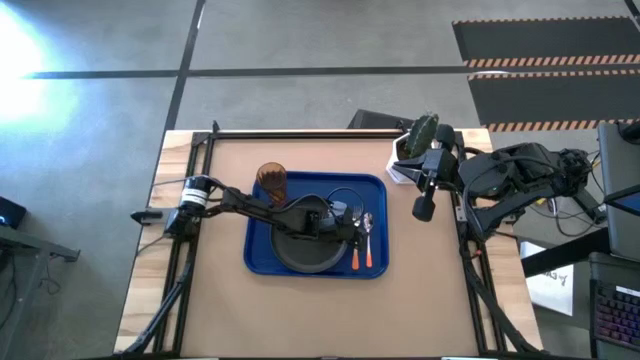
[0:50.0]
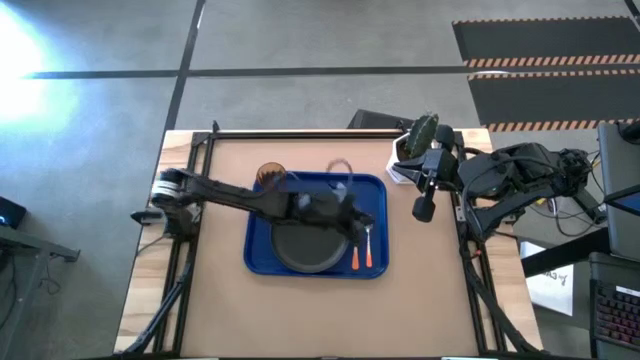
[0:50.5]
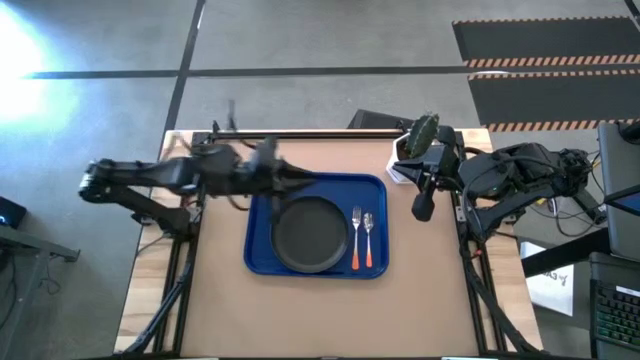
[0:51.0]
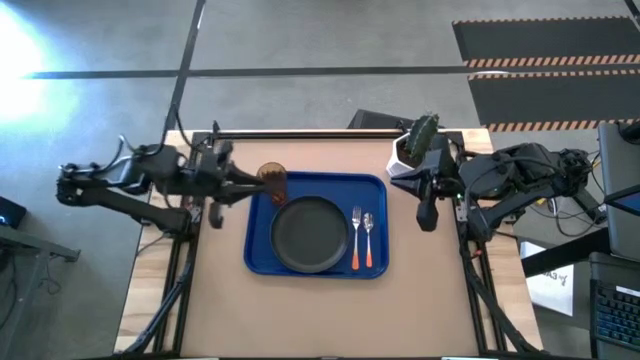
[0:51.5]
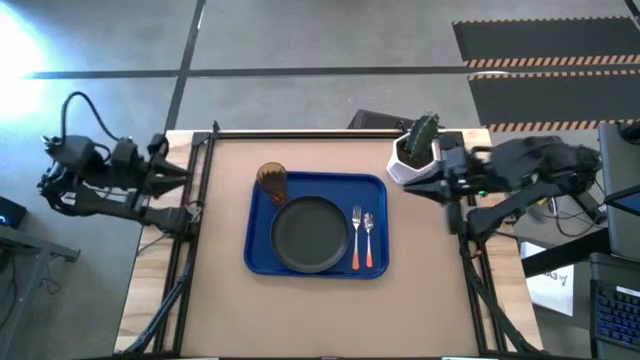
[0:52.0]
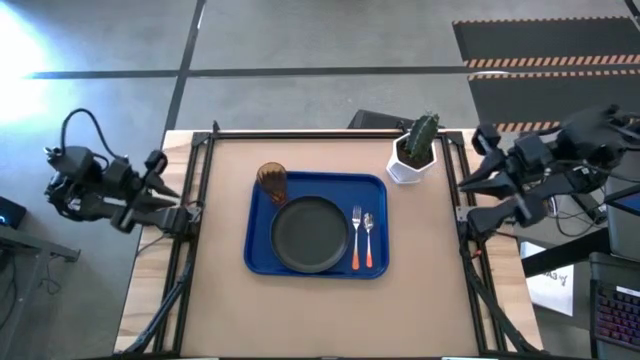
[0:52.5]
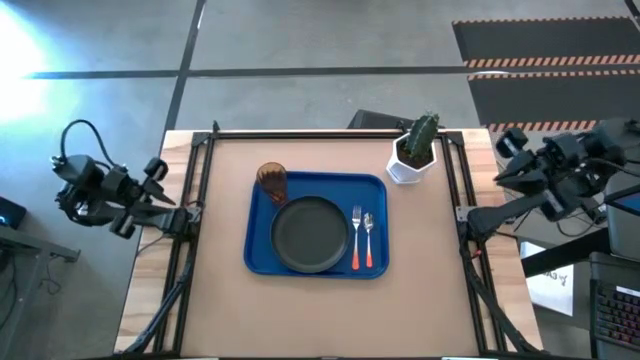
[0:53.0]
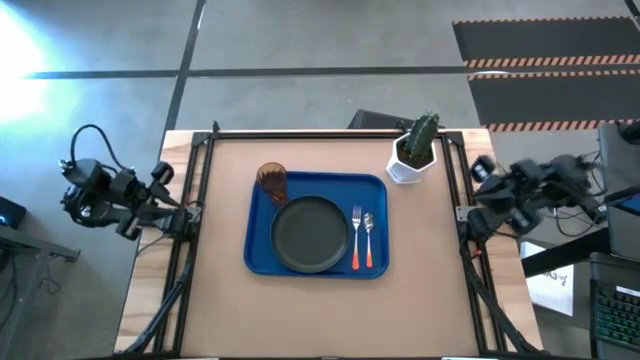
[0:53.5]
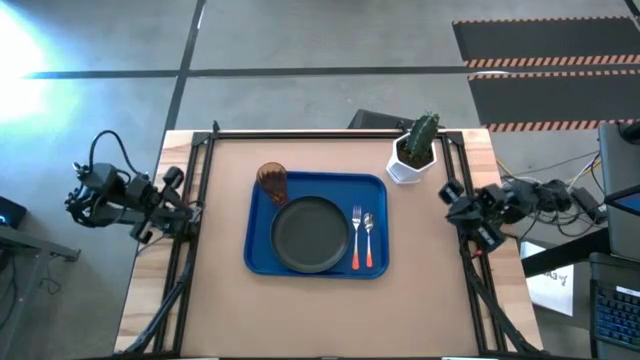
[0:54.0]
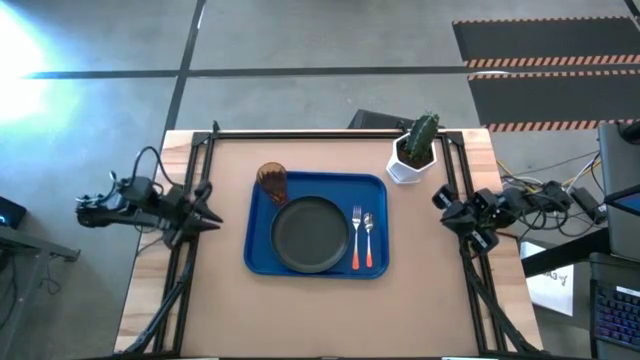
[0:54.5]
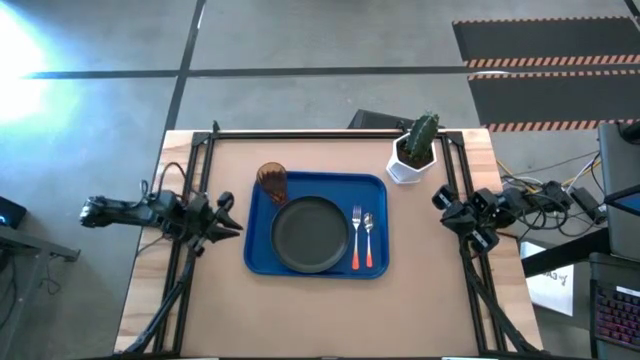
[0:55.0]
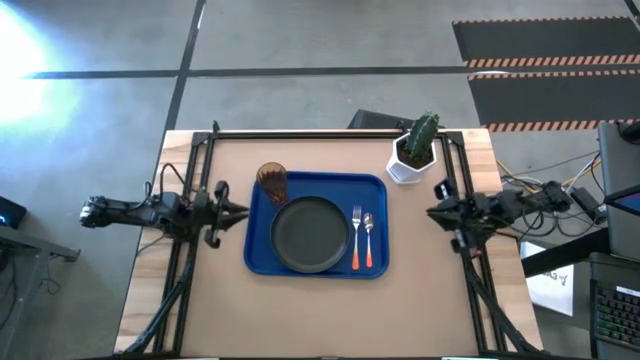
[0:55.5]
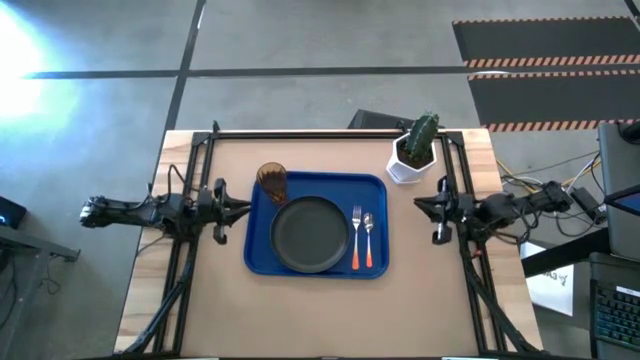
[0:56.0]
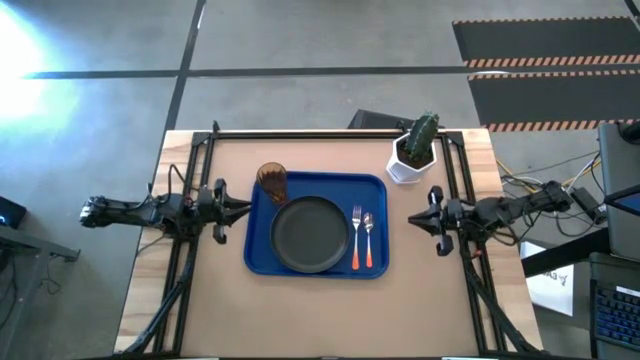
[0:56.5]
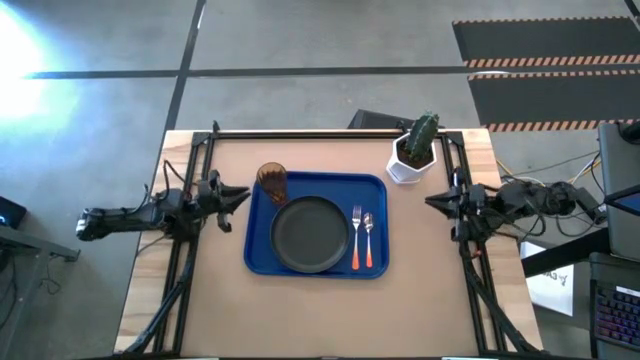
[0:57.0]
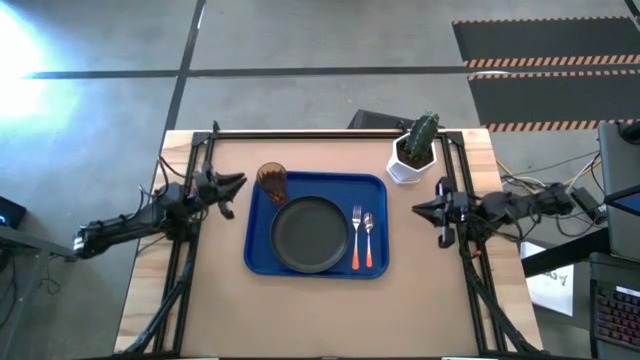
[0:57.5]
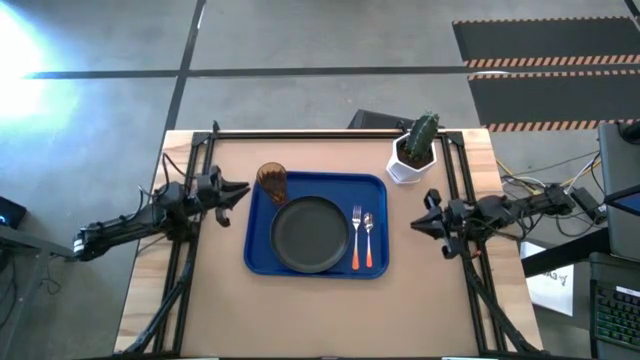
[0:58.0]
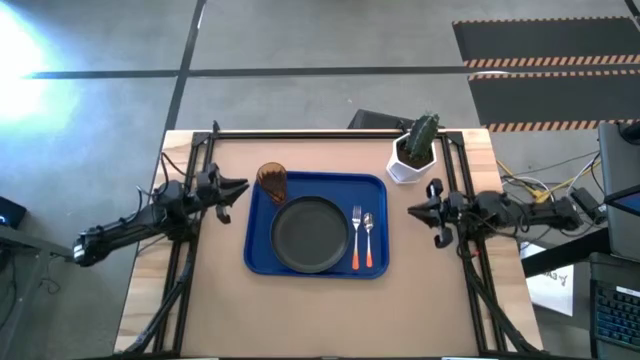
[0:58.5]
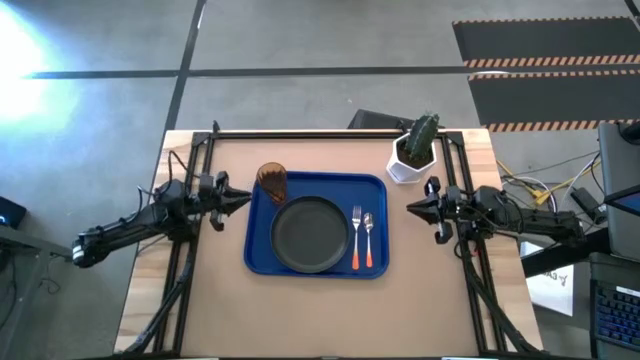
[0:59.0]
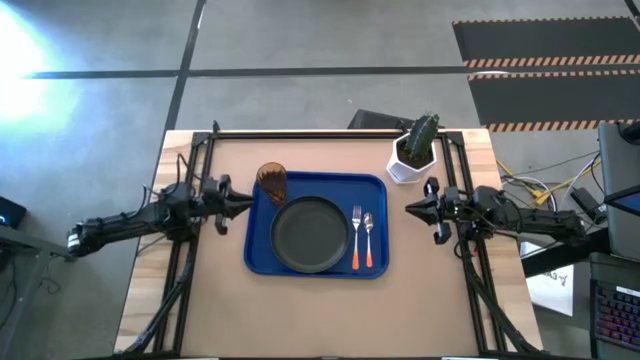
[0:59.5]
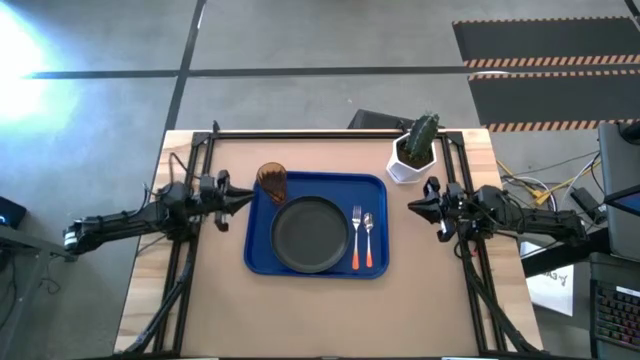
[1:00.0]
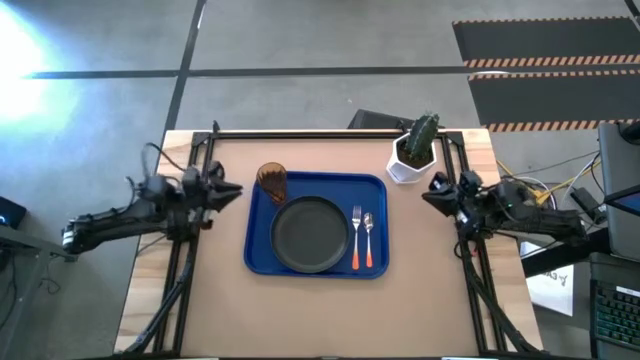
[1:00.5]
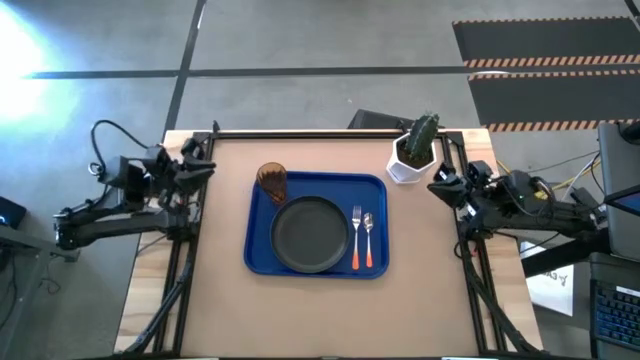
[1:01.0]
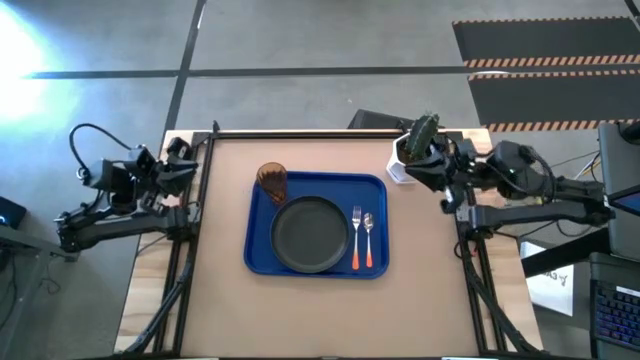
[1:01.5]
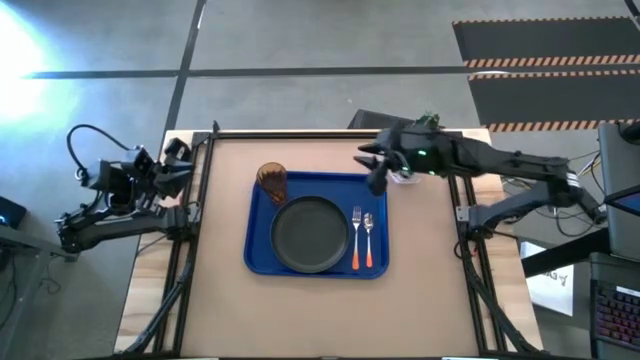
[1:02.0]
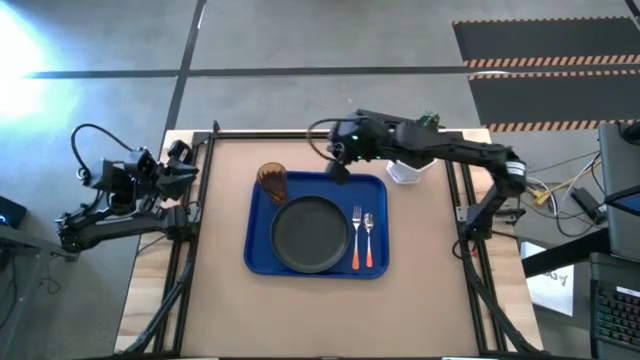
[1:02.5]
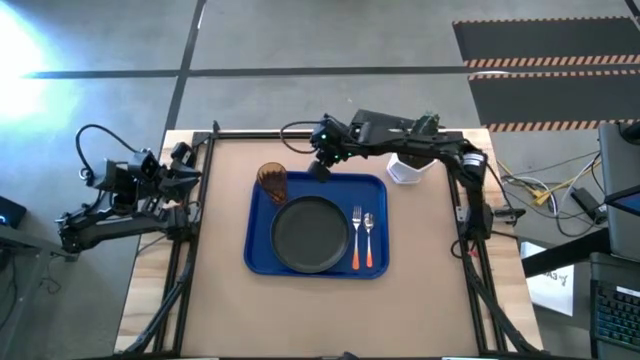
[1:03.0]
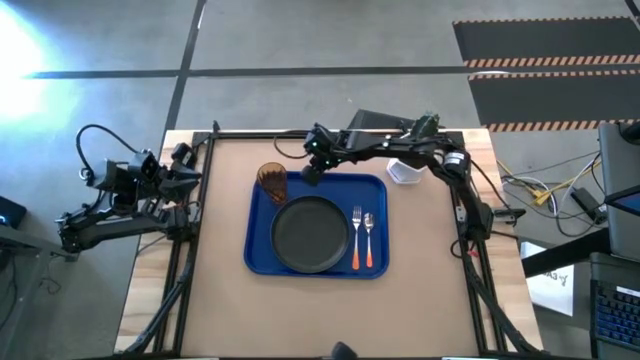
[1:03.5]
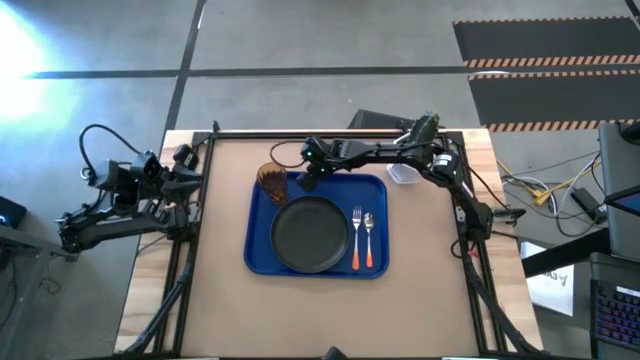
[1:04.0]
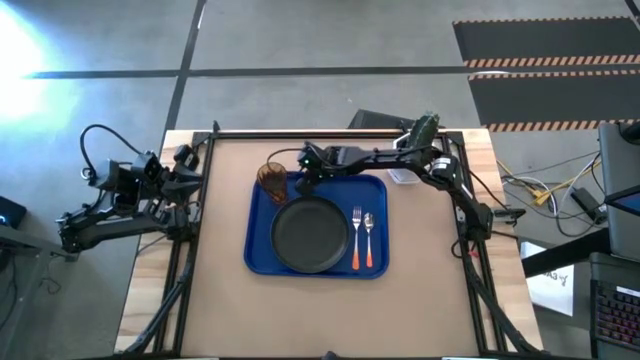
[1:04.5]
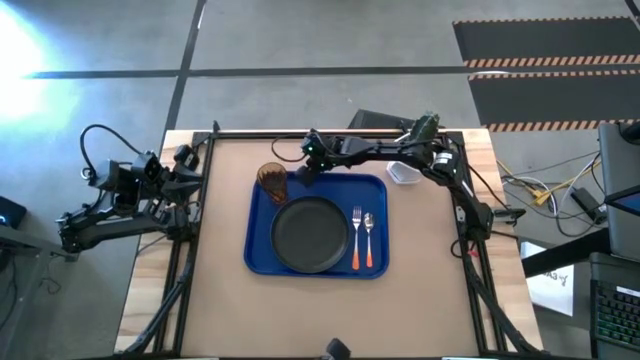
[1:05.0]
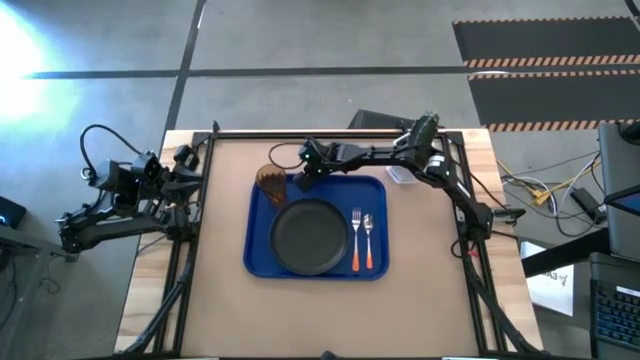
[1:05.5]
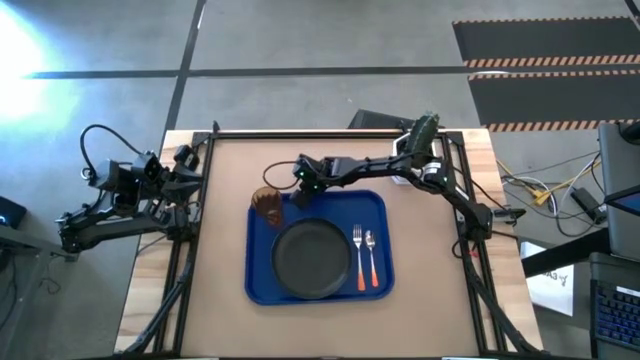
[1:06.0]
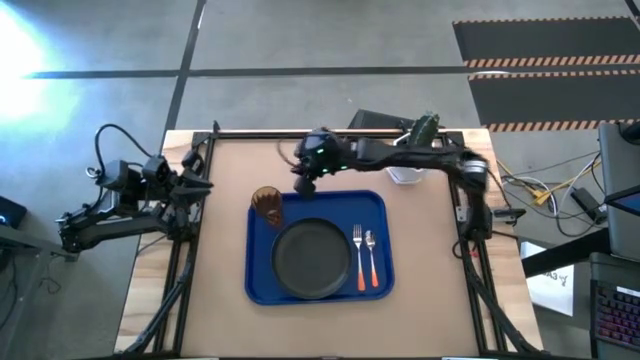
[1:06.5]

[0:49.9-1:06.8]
Task: Pick and place plate/cup/fork/spoon on tray
Adjust the blue tray on the table

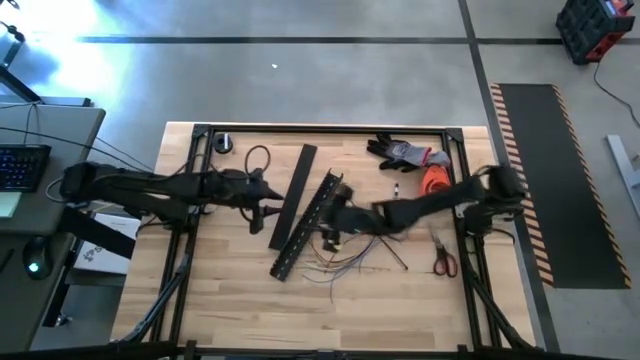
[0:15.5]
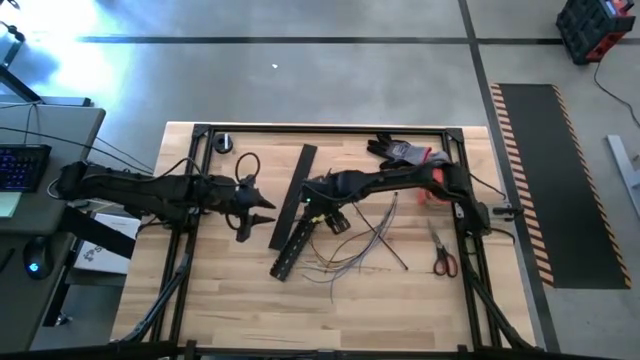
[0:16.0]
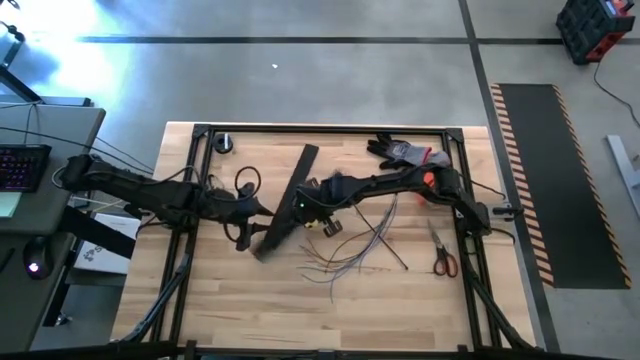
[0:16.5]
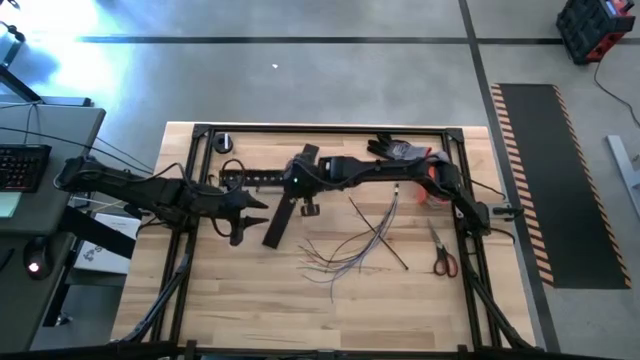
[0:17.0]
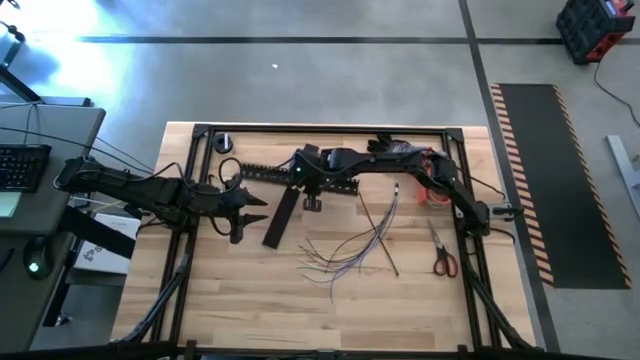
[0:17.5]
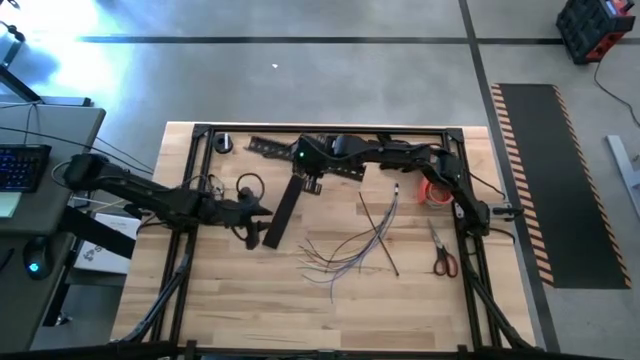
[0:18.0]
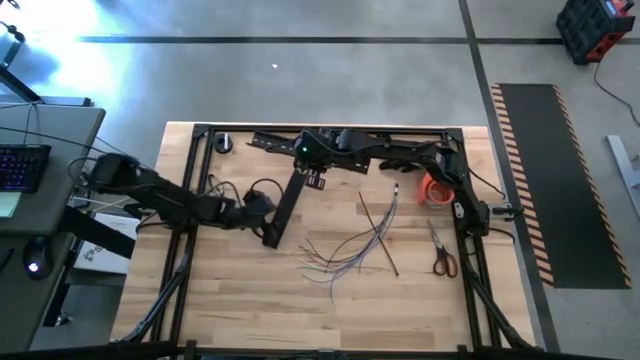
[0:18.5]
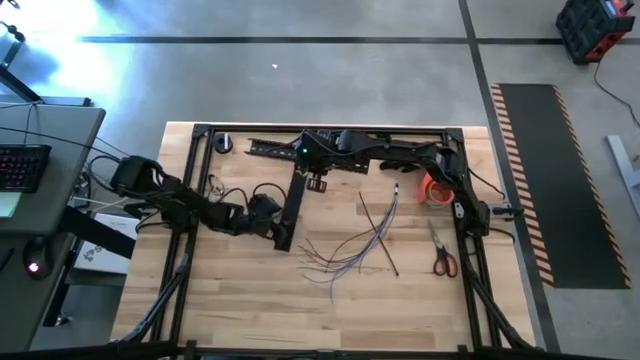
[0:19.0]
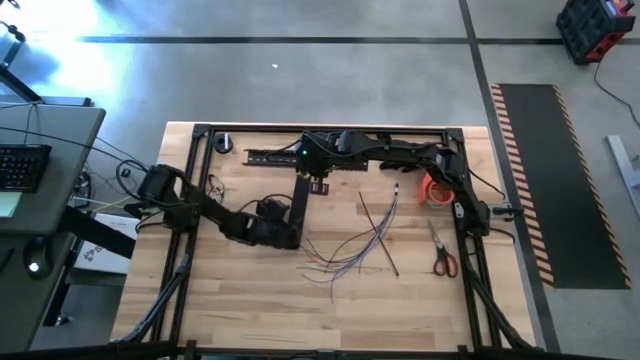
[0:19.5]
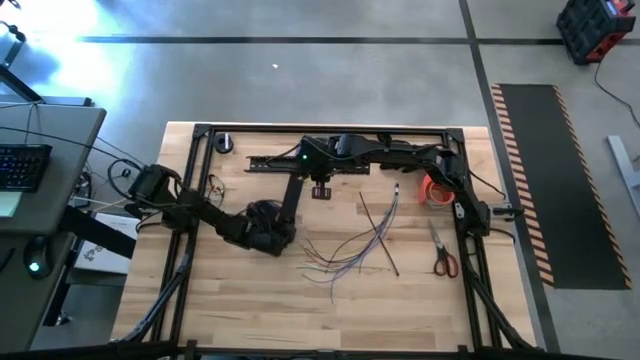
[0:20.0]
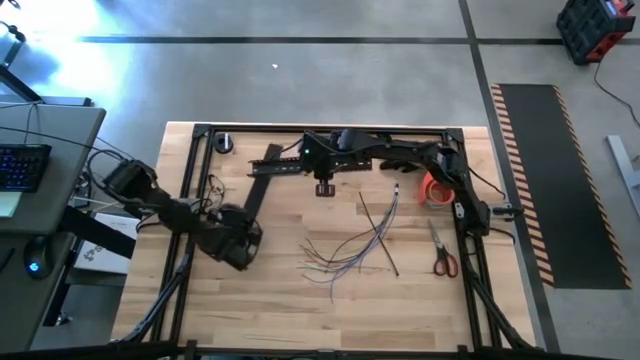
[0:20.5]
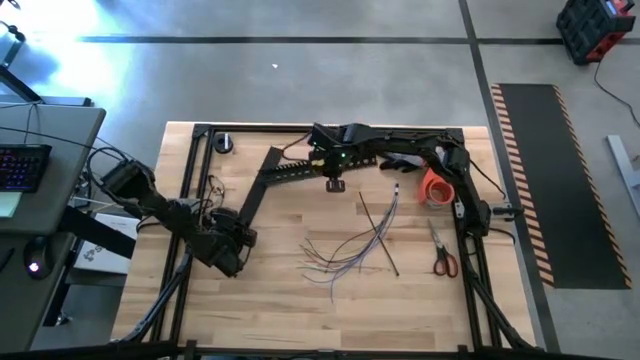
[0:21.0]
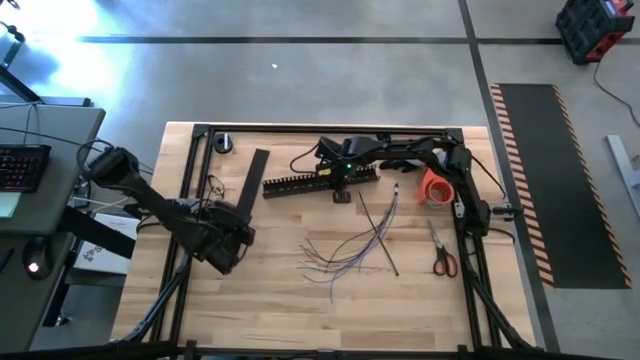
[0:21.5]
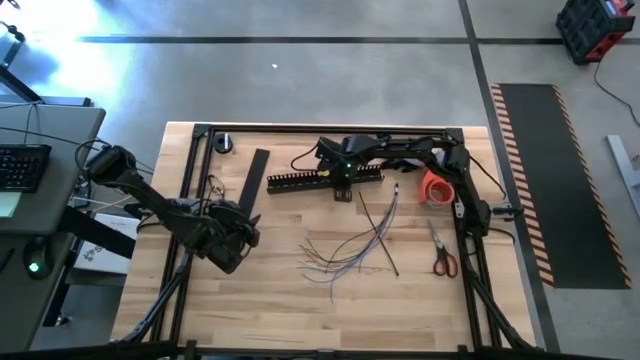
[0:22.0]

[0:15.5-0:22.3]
Task: Ziptie cables
Move the black cable duct to the top left of the table
